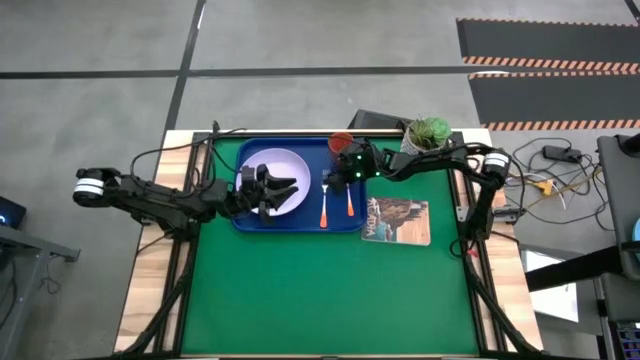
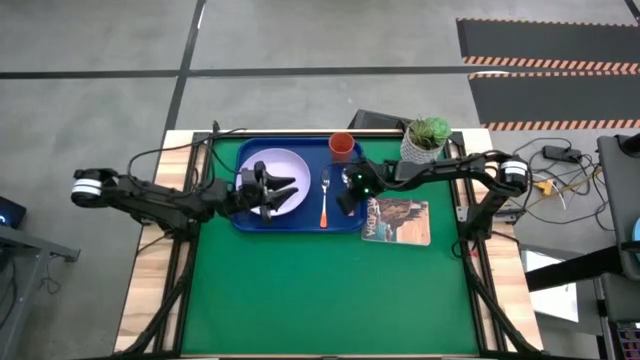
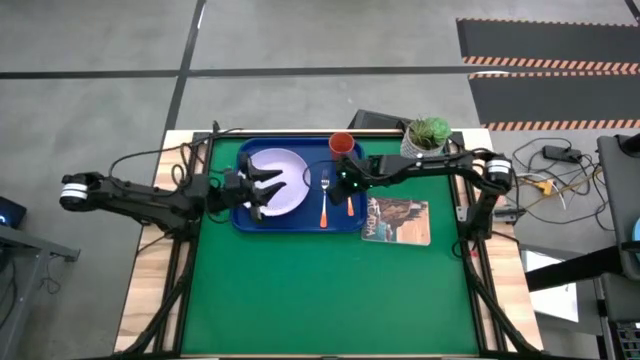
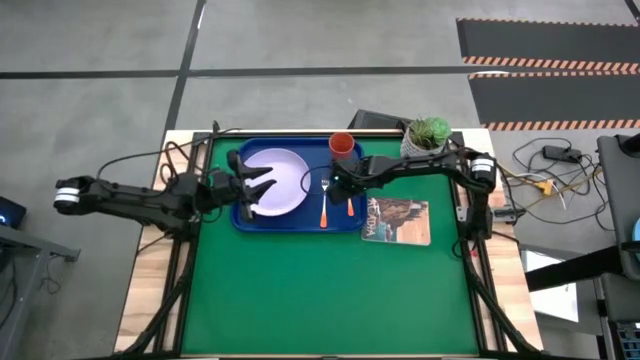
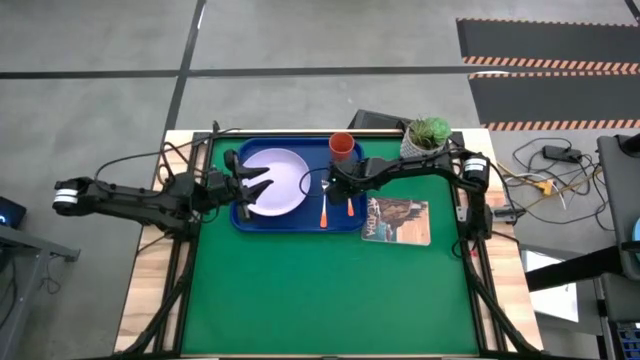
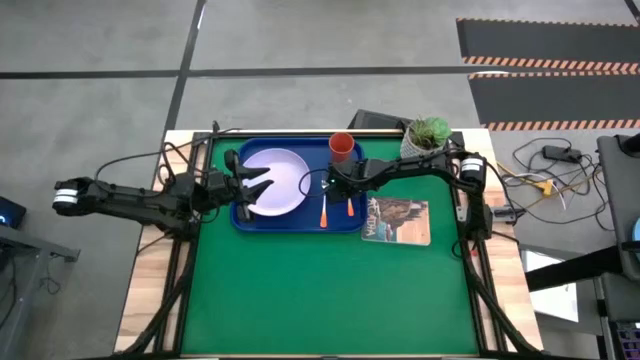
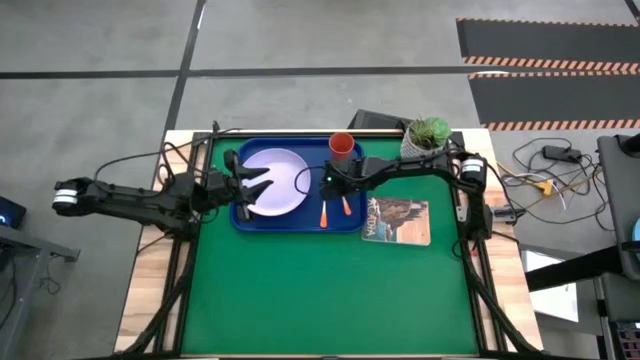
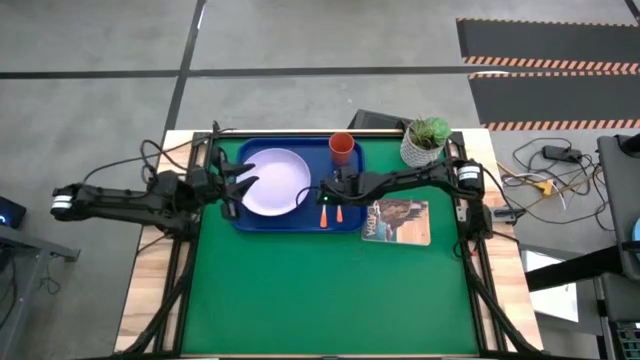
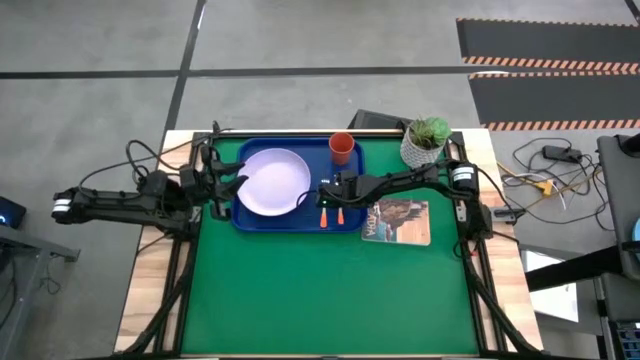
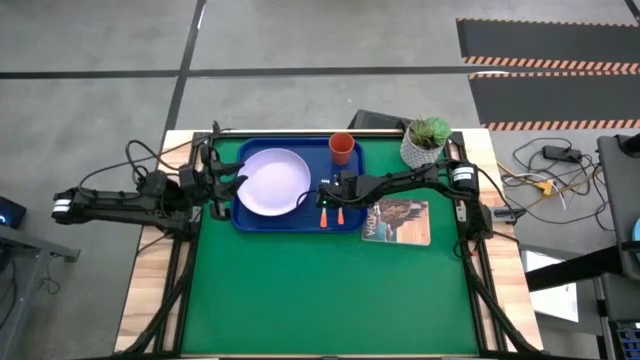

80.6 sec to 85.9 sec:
Task: Pick and place plate/cup/fork/spoon on tray
Adjust the orange spoon on the blue serving tray

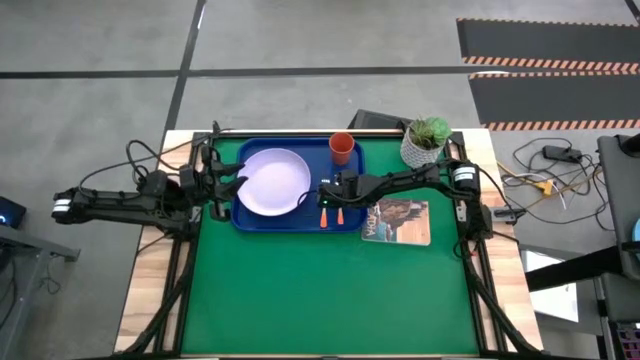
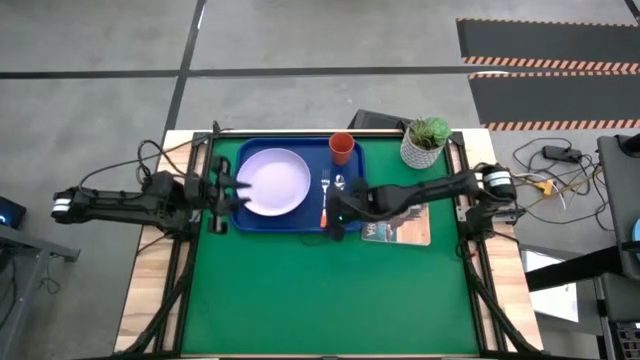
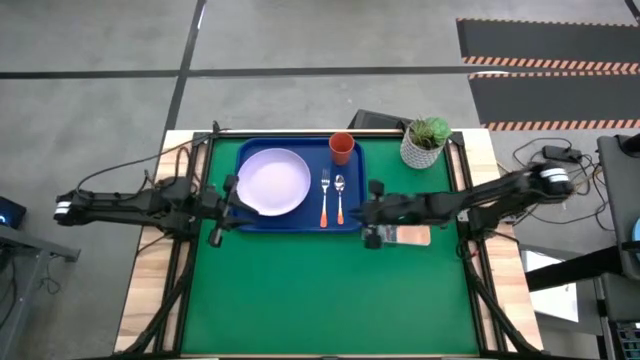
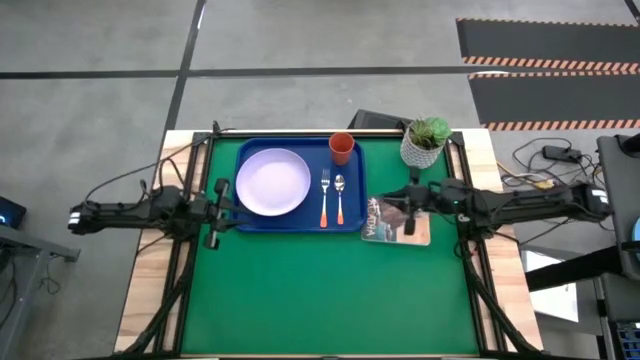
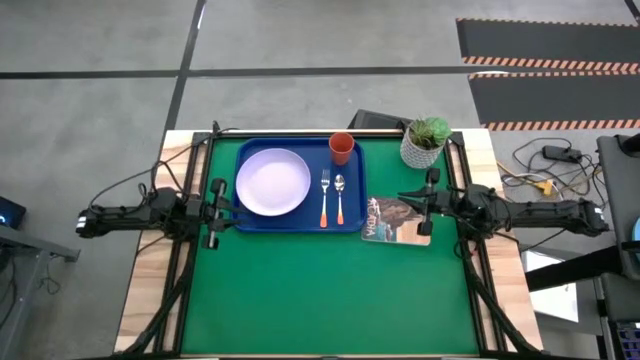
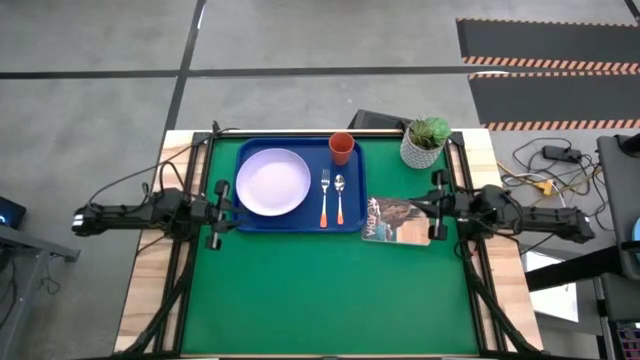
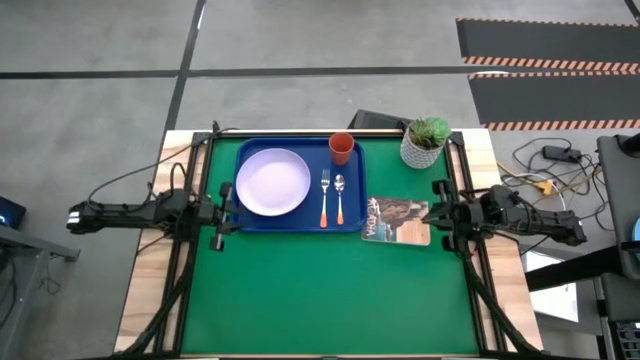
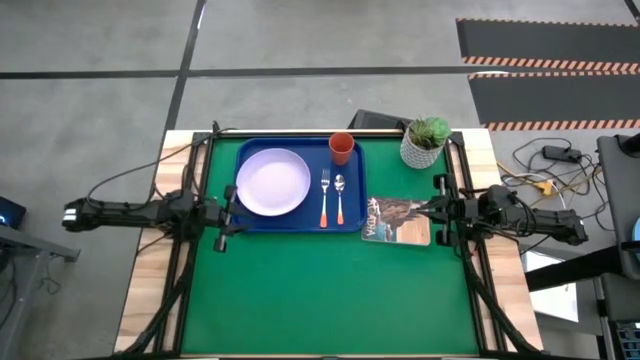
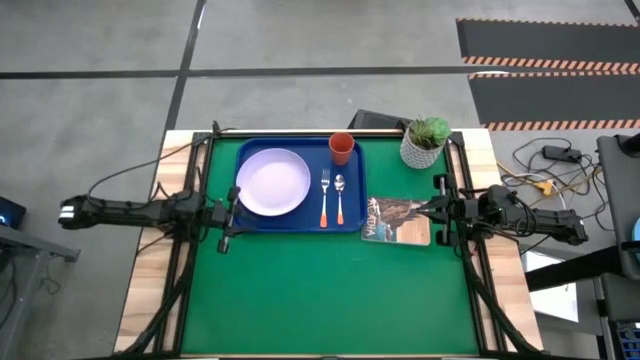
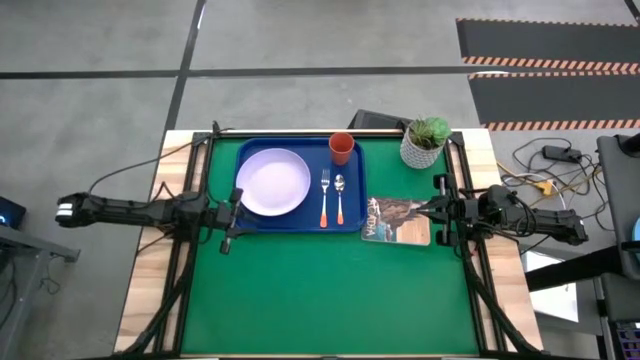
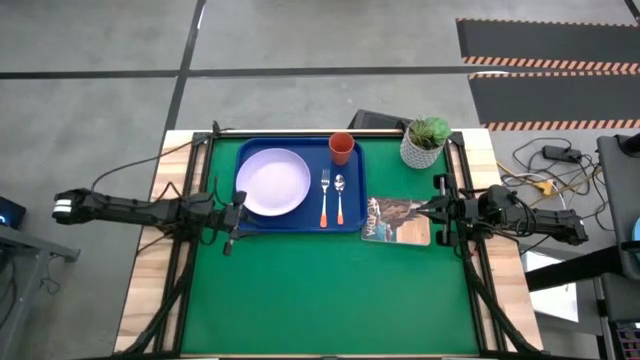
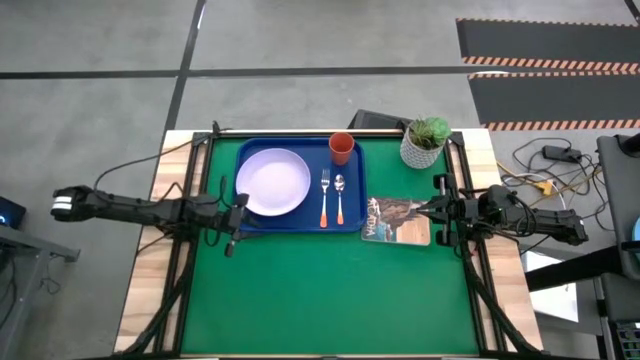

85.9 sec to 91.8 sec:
Return to Home Position

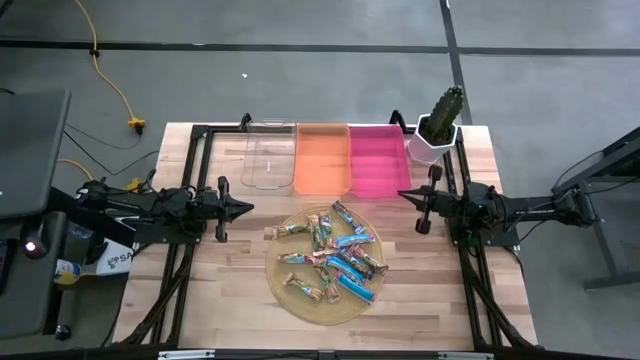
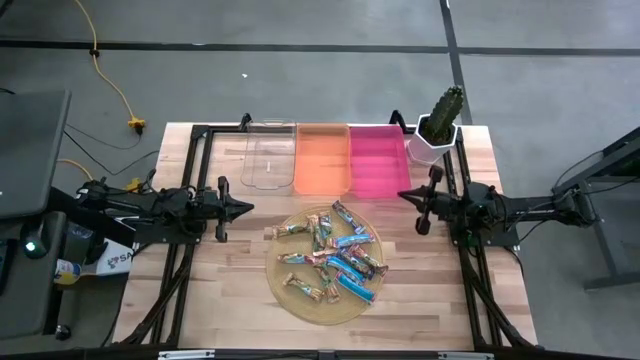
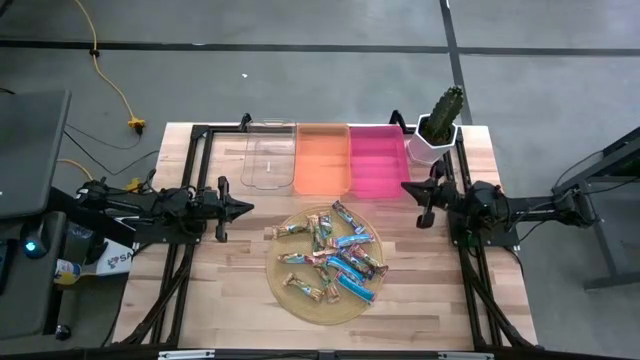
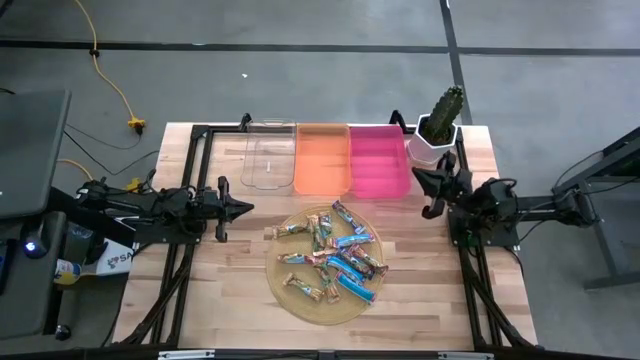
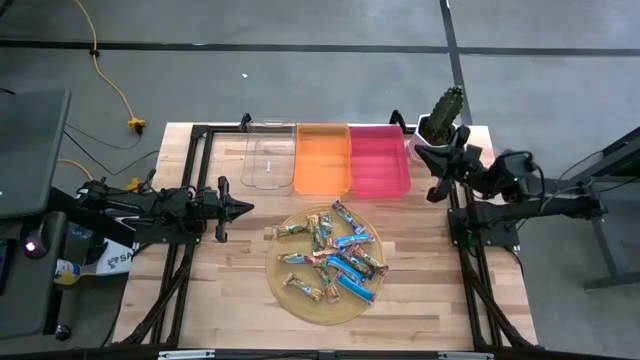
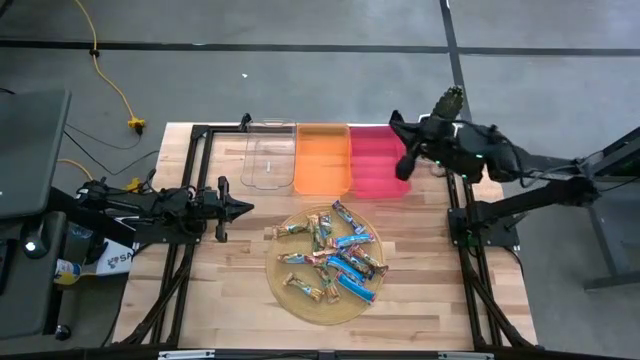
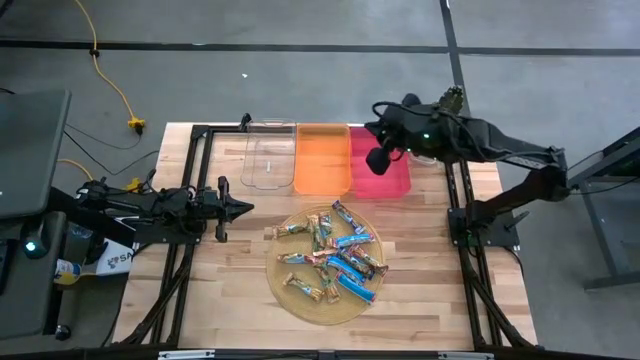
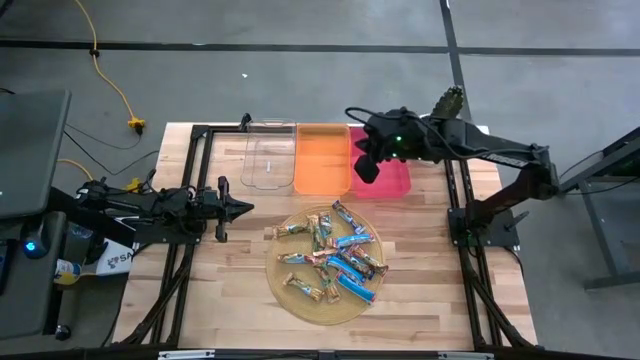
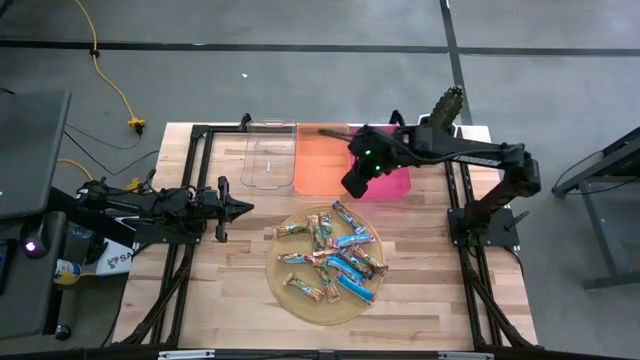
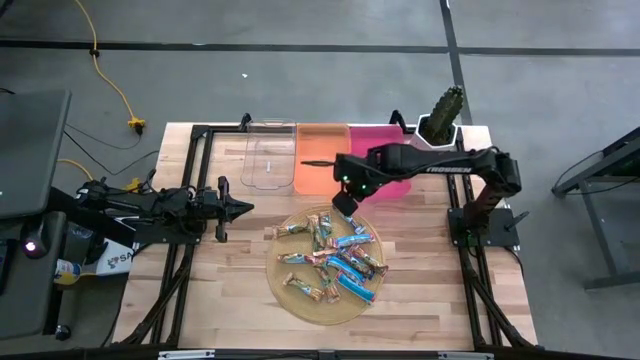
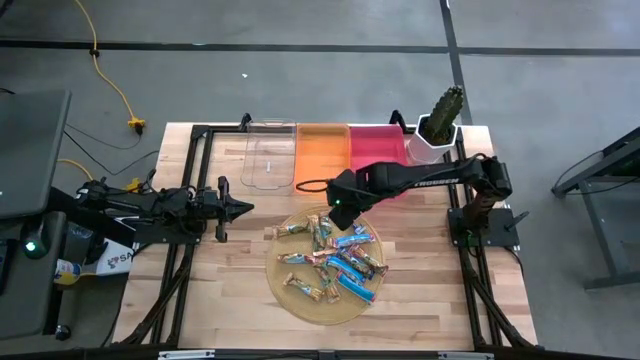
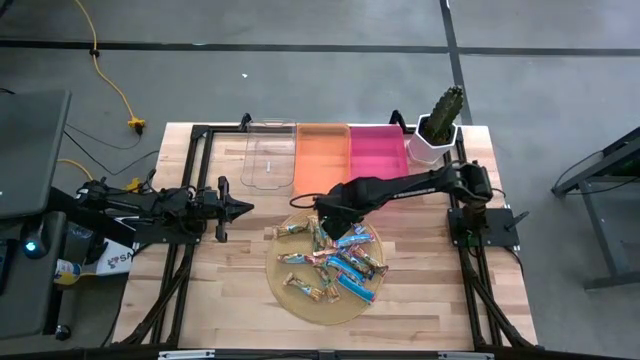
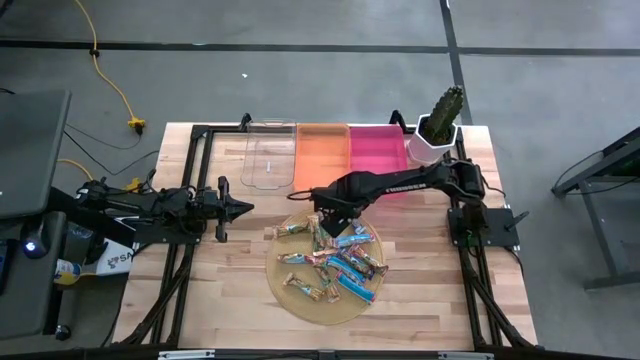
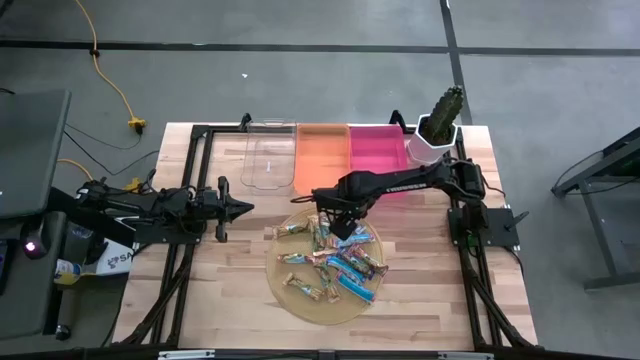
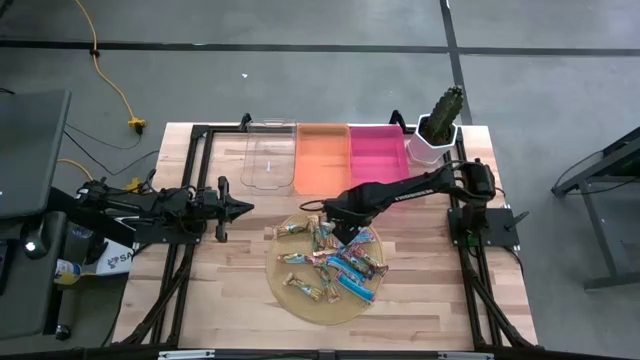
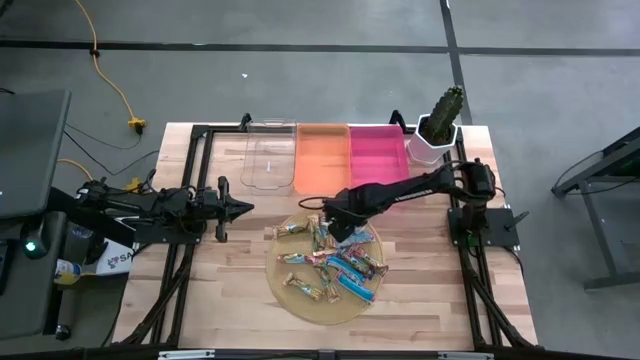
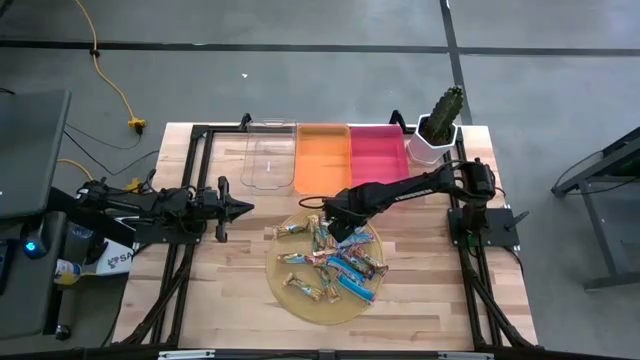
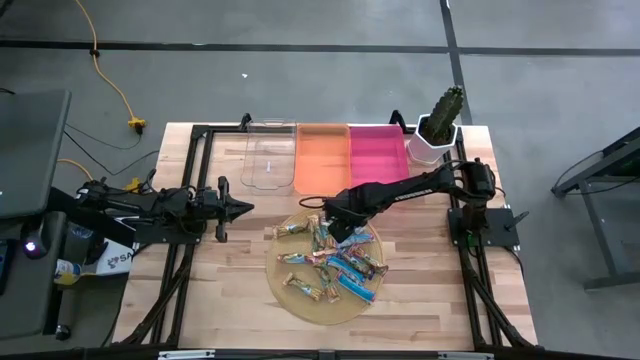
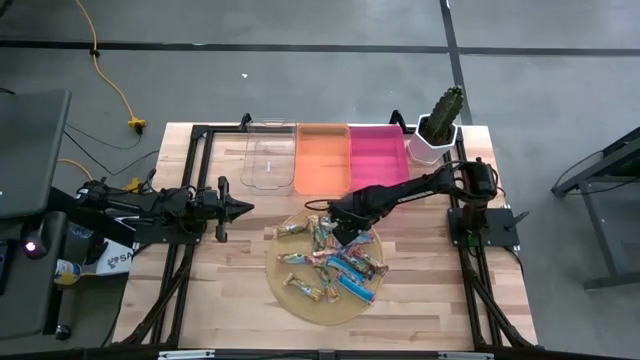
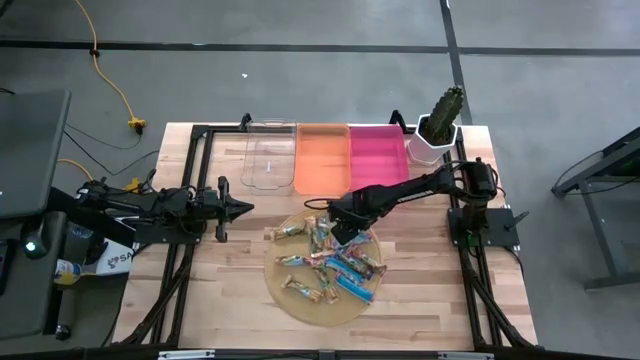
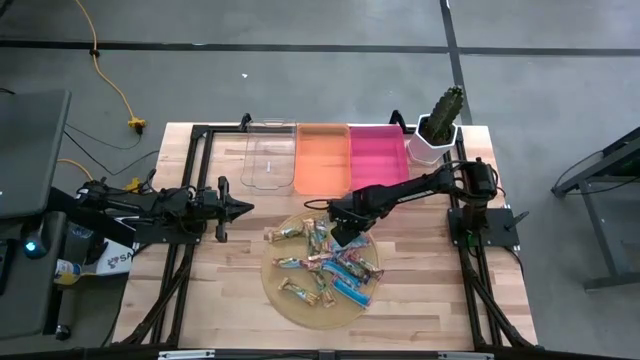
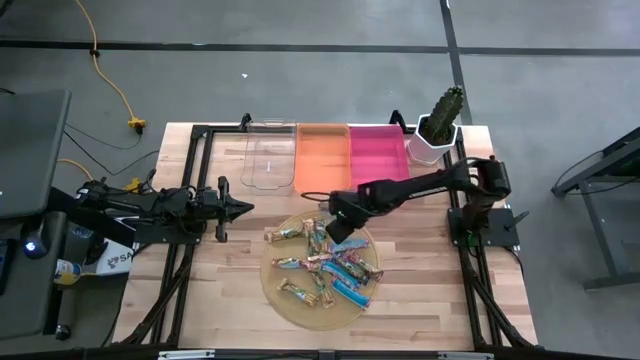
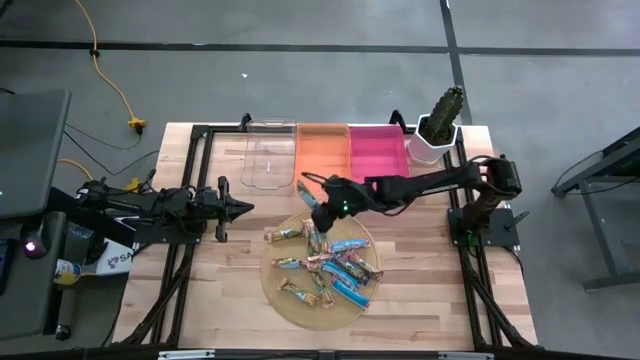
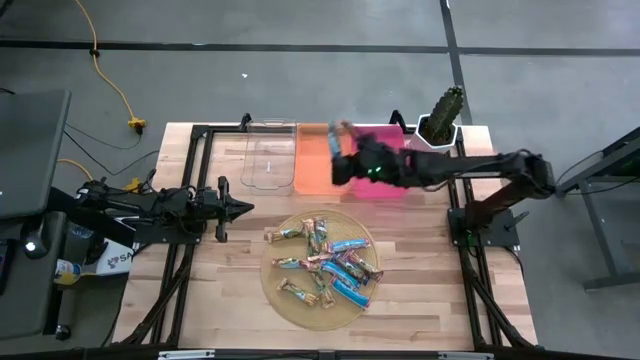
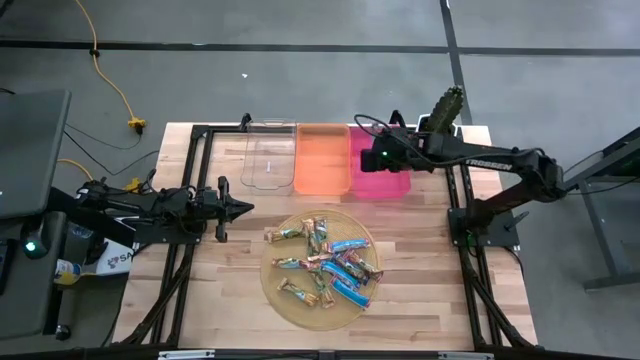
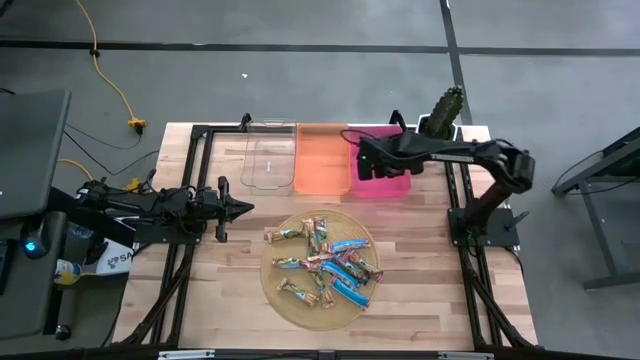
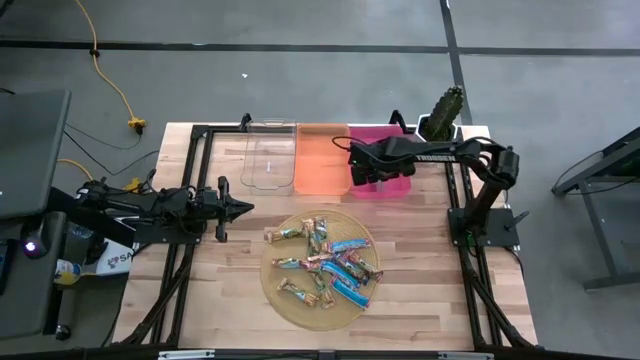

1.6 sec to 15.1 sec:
Task: Pick and place Granola Bars by type
Put the blue granola bar into the pink bin
